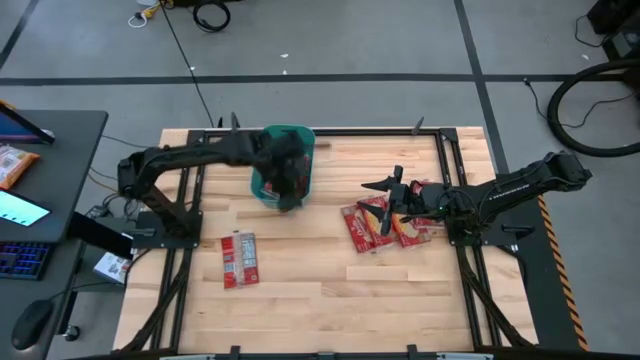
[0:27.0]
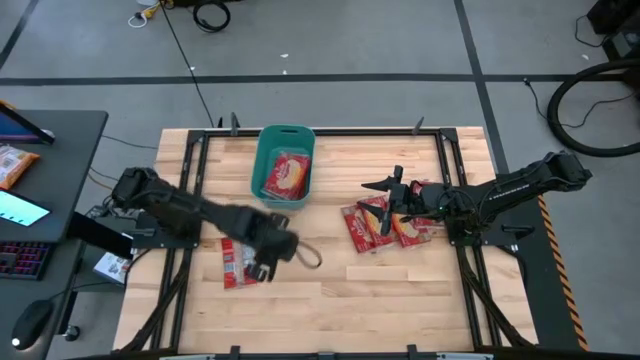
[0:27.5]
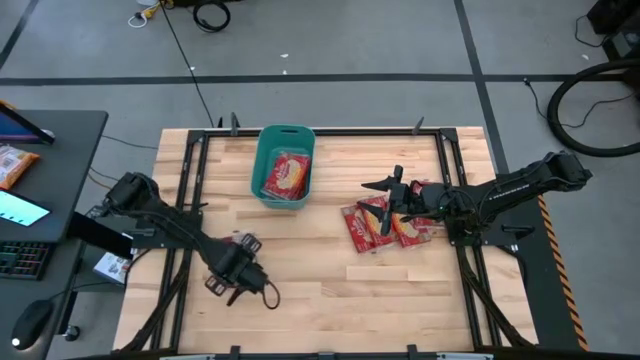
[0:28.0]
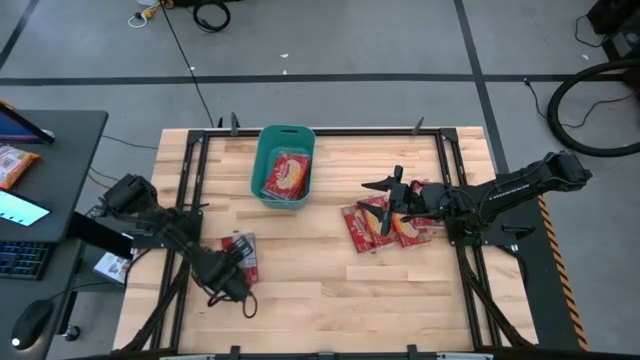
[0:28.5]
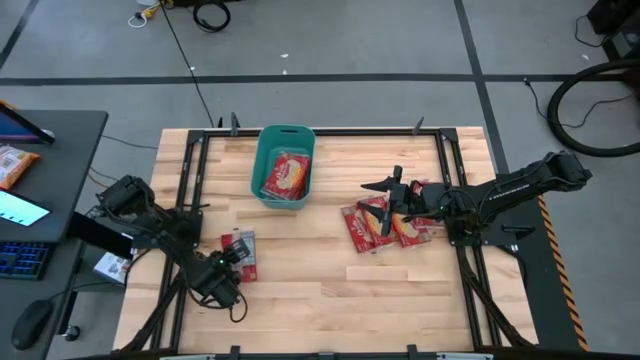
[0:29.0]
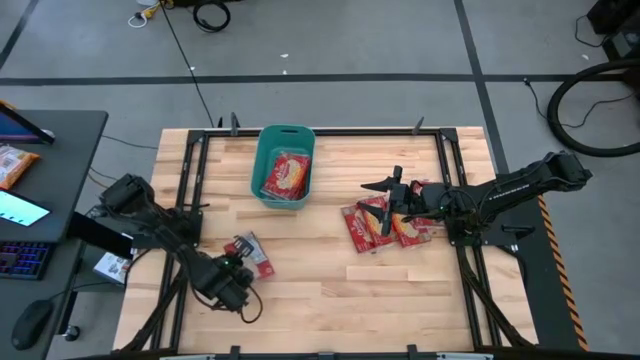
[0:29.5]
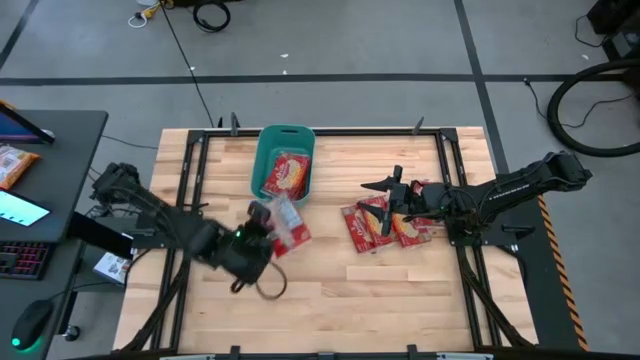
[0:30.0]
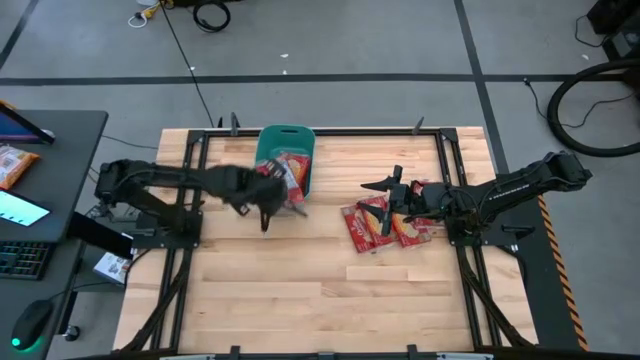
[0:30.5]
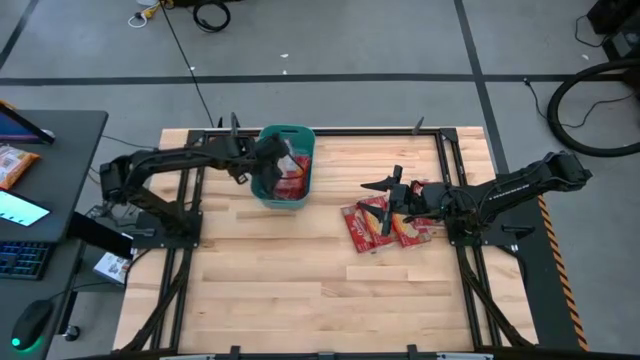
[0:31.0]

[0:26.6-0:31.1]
Task: Sort popcorn bags into baskets
Put the red popcorn bag into the green bin

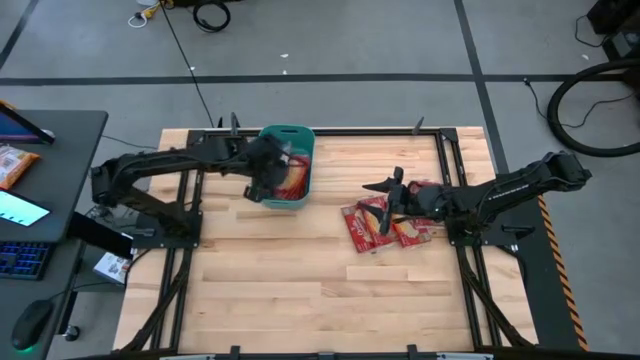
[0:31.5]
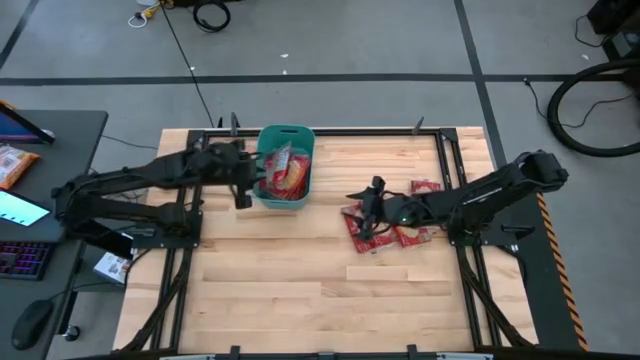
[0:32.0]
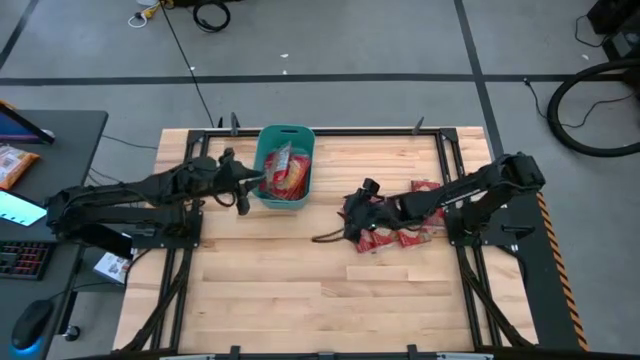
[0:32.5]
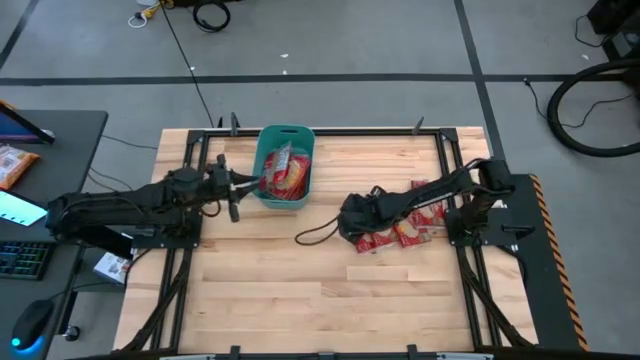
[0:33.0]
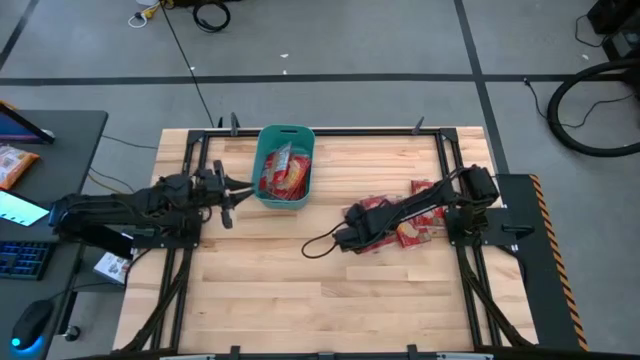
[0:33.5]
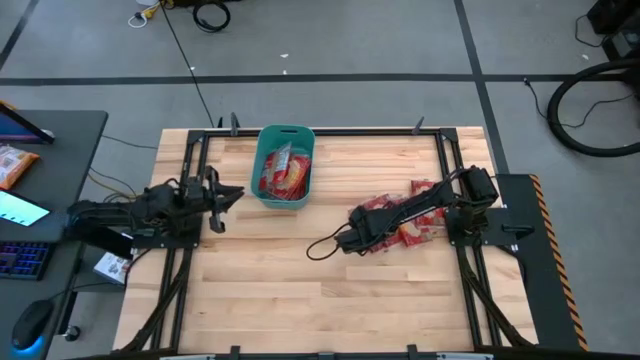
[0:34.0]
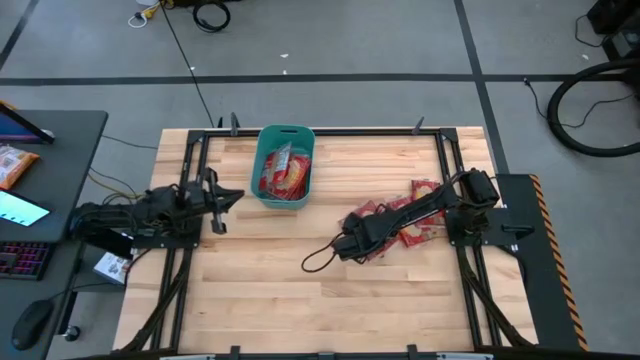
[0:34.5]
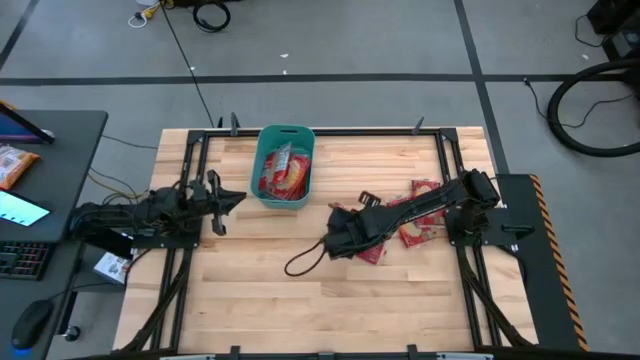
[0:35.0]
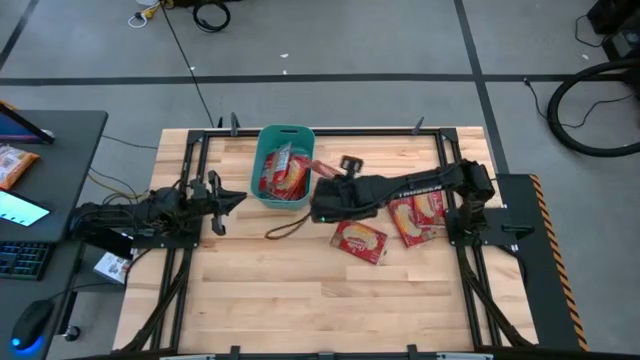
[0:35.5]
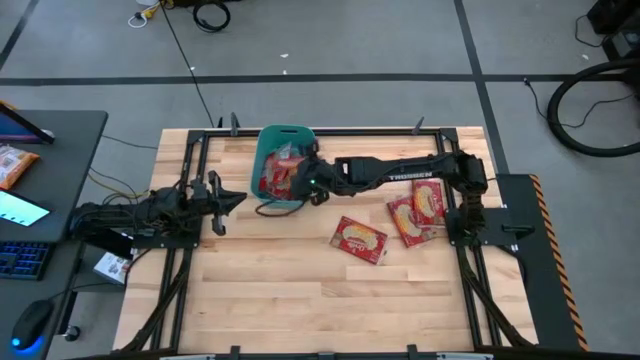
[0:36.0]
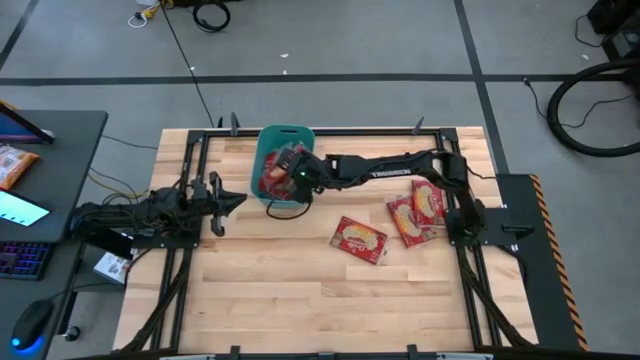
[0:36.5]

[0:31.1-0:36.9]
Put the red popcorn bag into the green bin

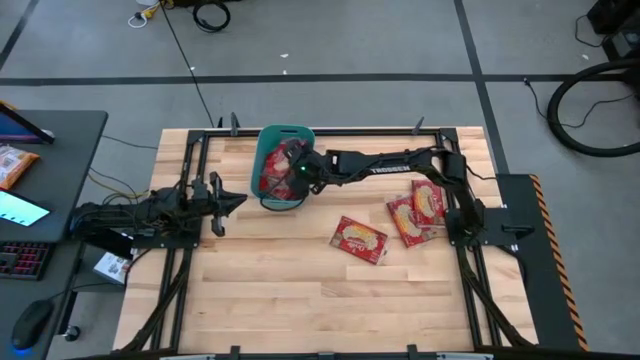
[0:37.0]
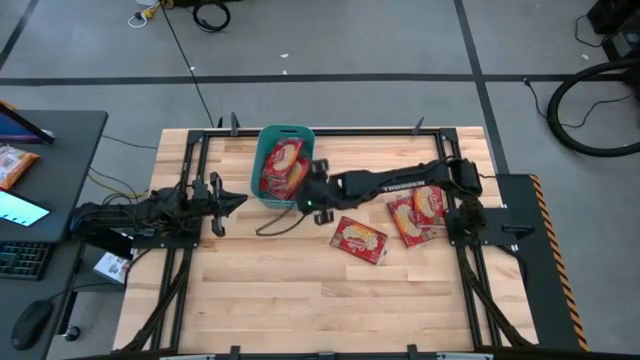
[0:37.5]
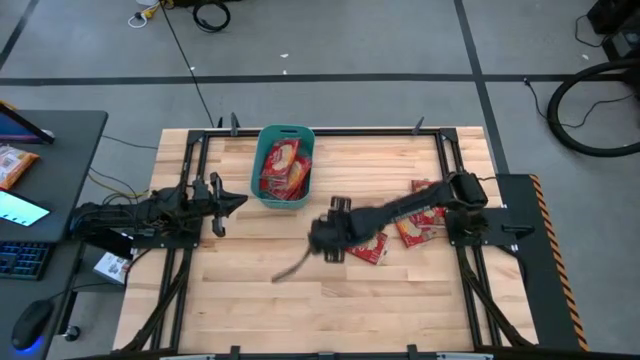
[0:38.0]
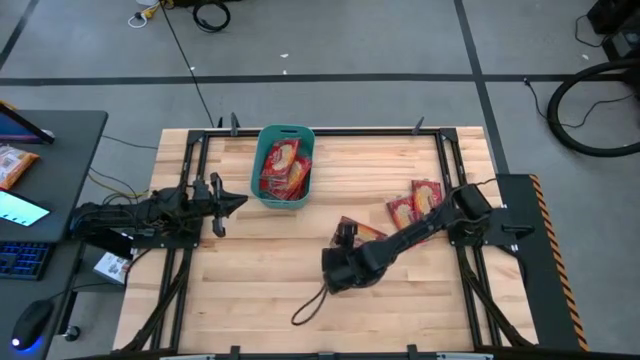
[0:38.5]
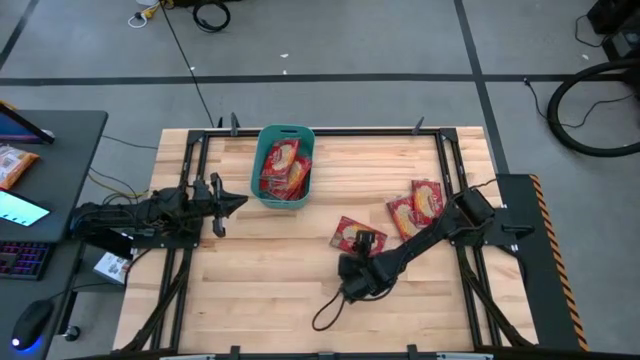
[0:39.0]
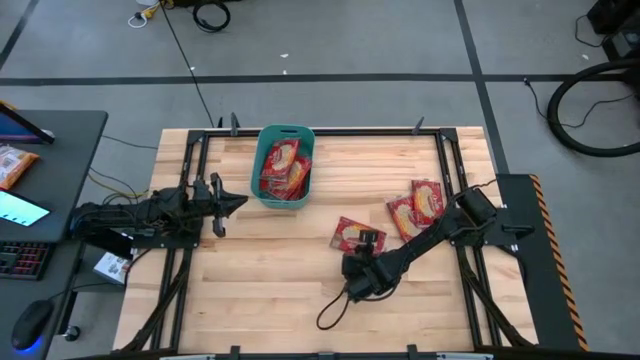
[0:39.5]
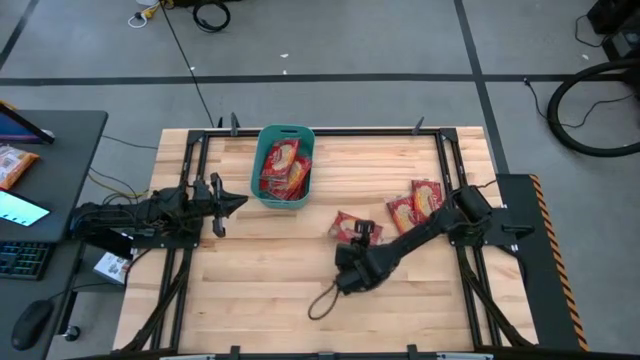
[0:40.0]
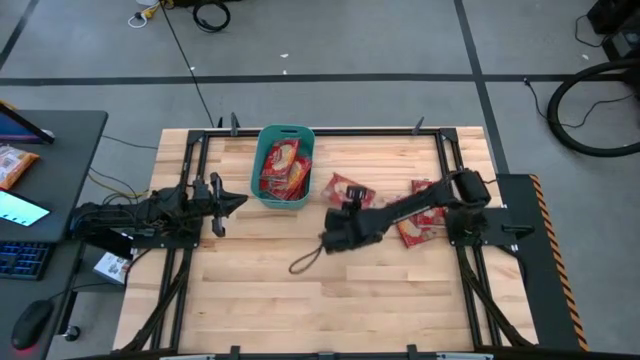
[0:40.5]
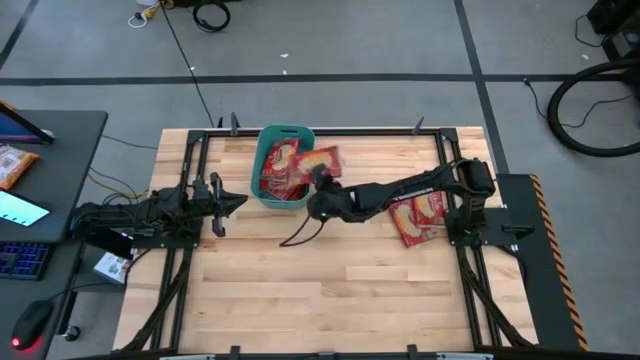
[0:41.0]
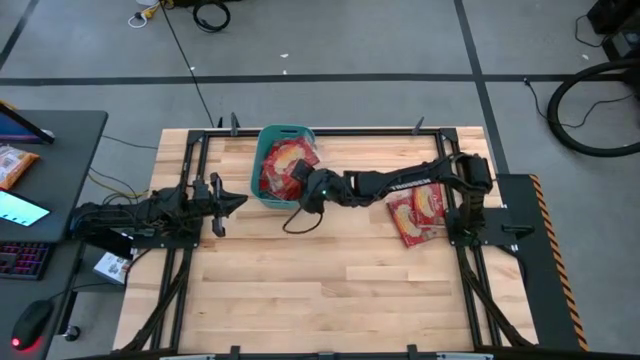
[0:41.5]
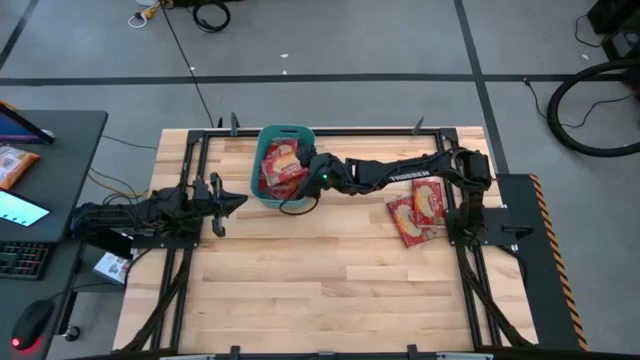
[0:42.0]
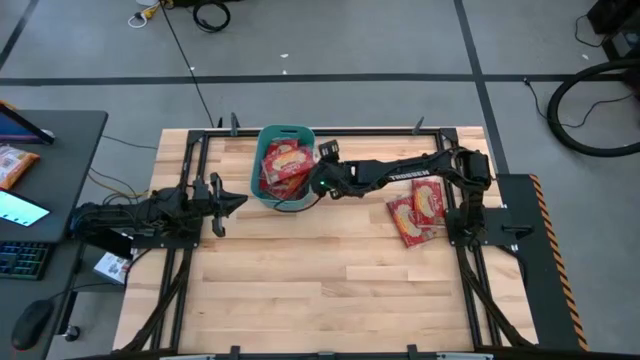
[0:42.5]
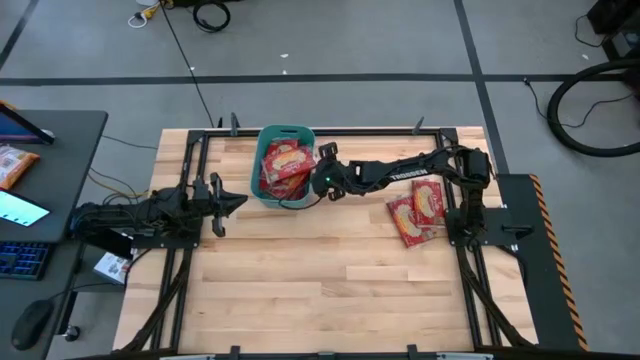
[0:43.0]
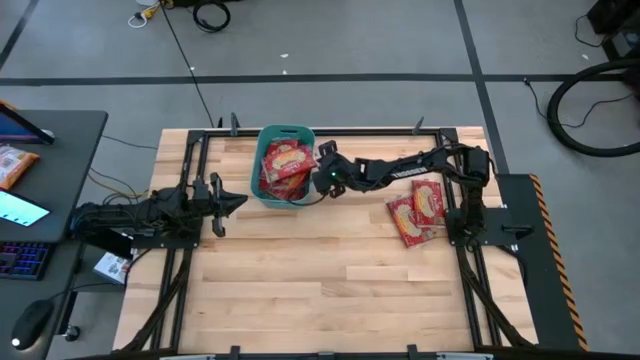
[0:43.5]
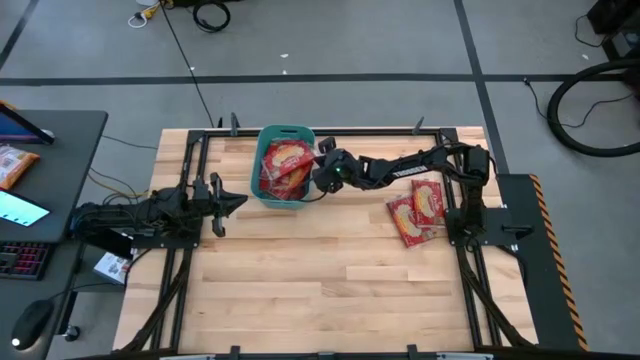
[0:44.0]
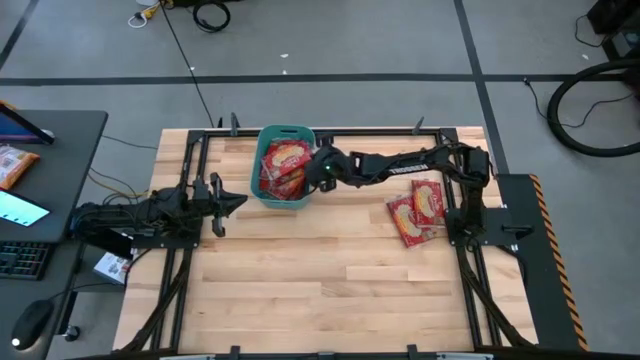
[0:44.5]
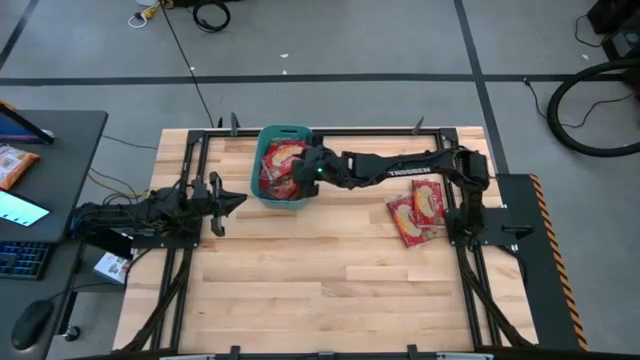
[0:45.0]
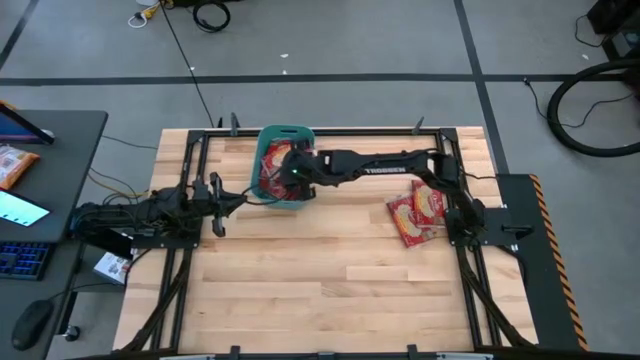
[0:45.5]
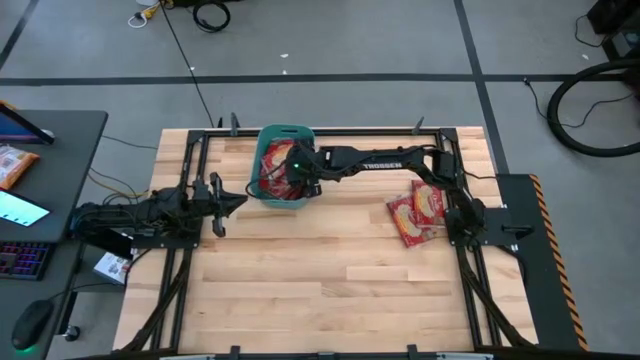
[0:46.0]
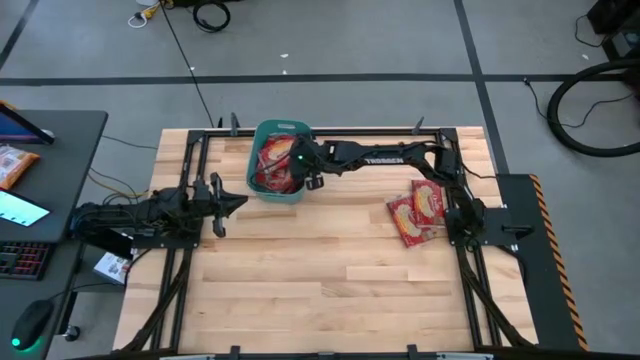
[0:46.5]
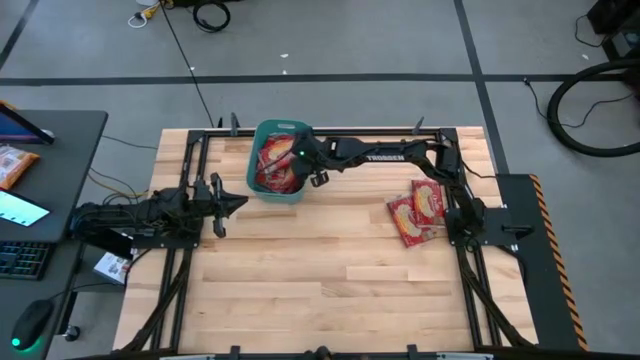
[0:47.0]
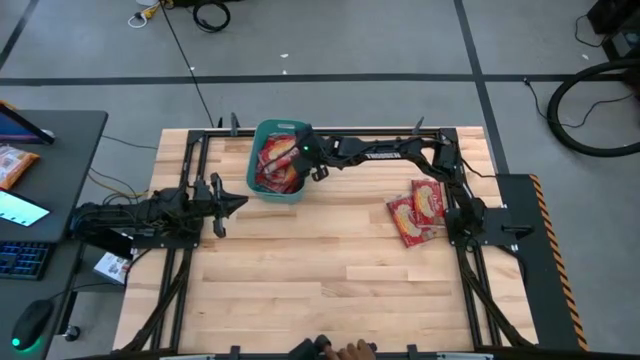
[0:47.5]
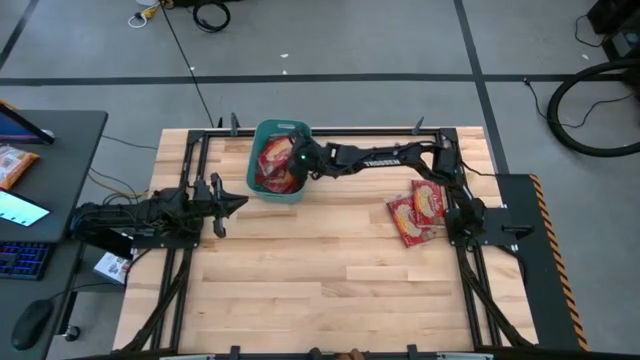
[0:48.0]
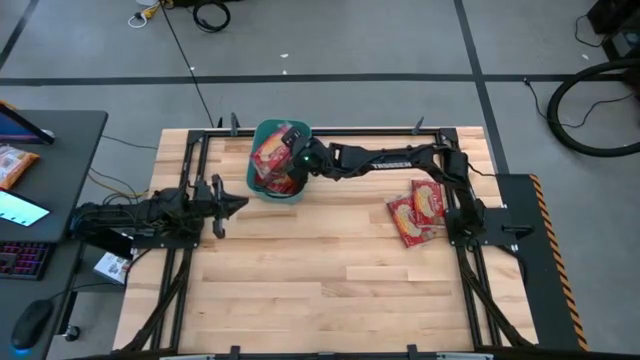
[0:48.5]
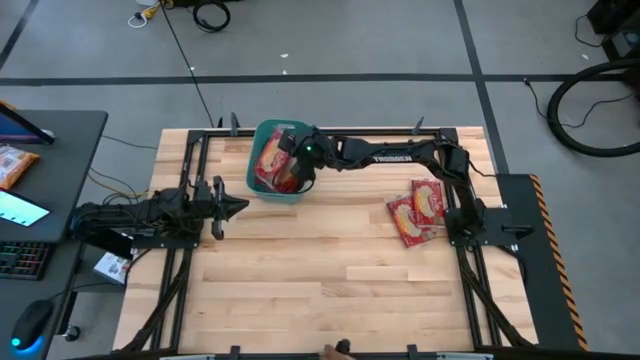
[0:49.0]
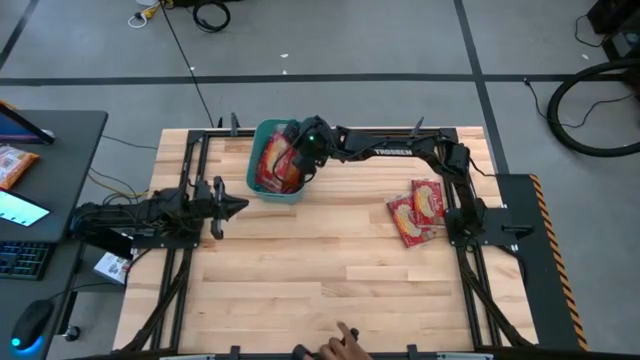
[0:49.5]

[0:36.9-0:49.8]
Put the red popcorn bag into the green bin
